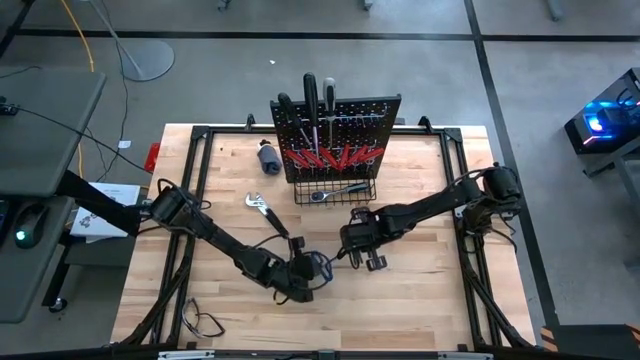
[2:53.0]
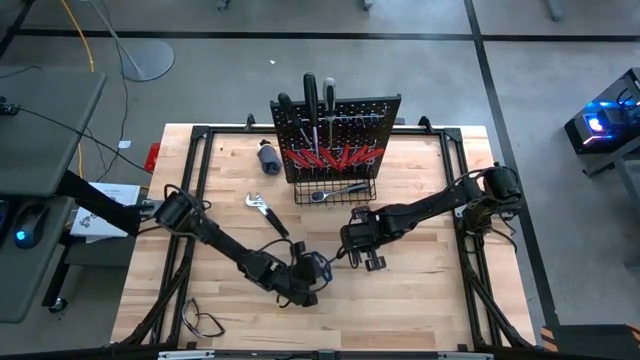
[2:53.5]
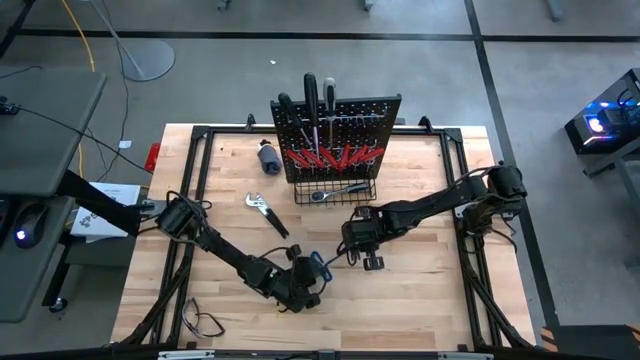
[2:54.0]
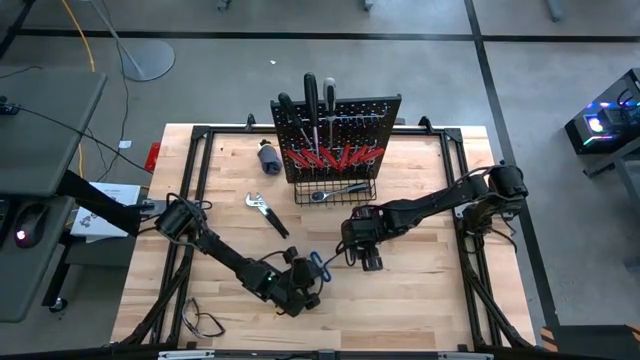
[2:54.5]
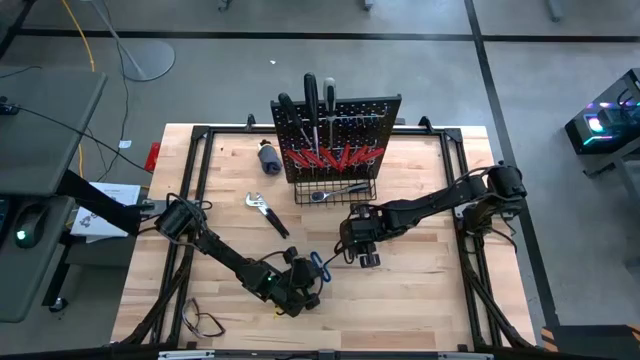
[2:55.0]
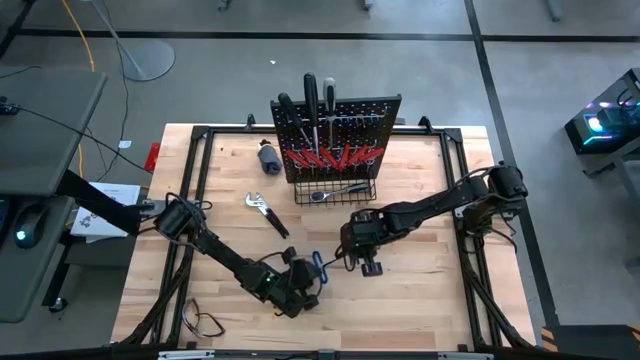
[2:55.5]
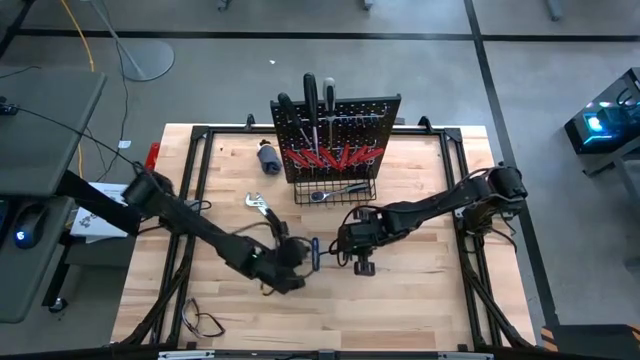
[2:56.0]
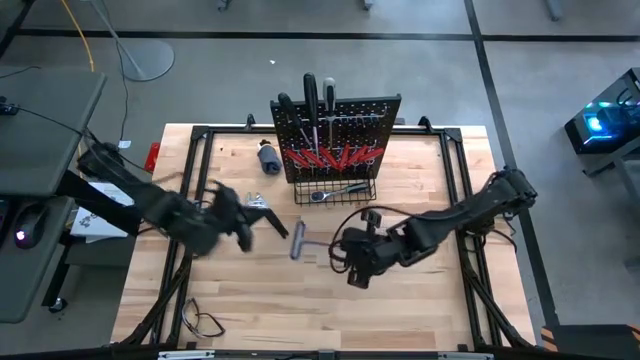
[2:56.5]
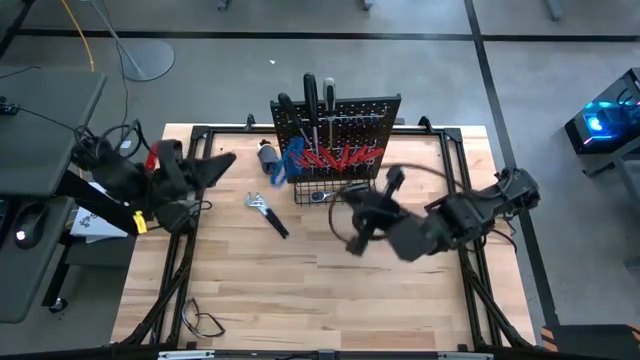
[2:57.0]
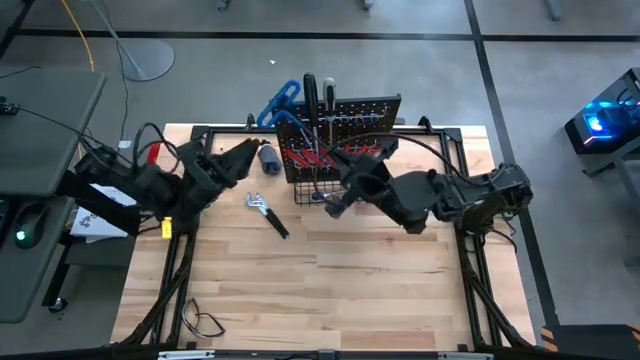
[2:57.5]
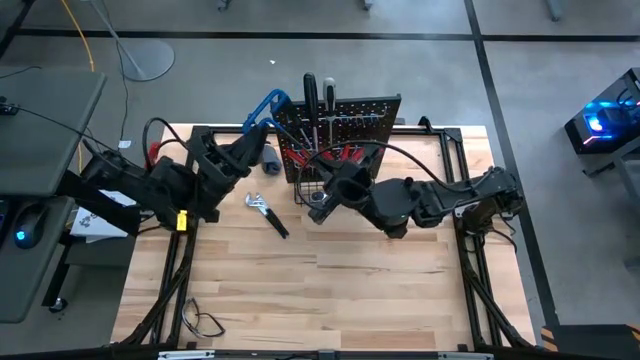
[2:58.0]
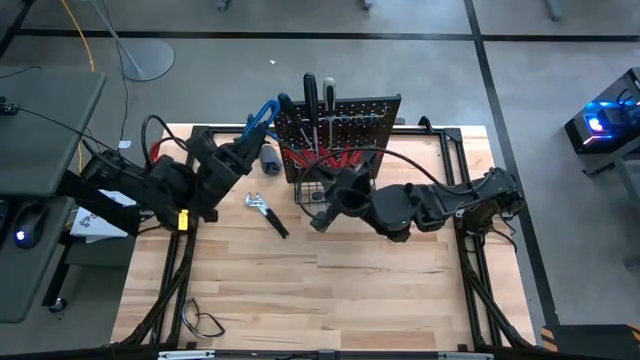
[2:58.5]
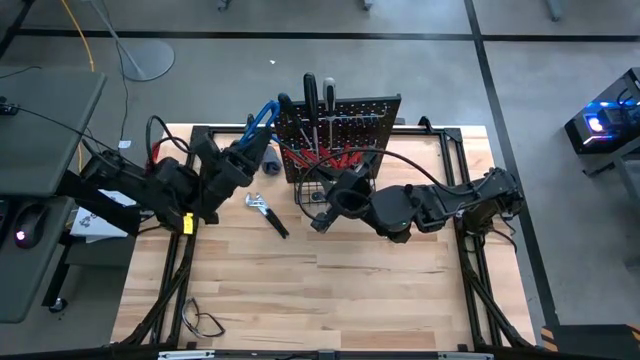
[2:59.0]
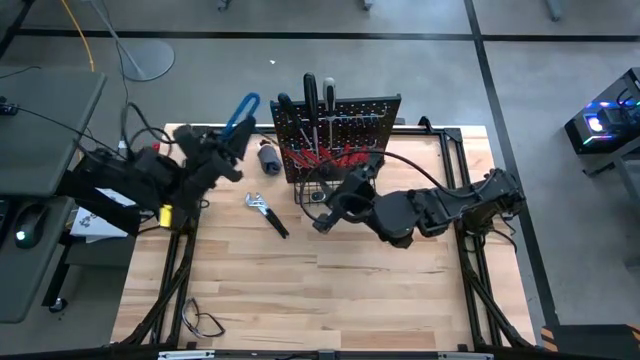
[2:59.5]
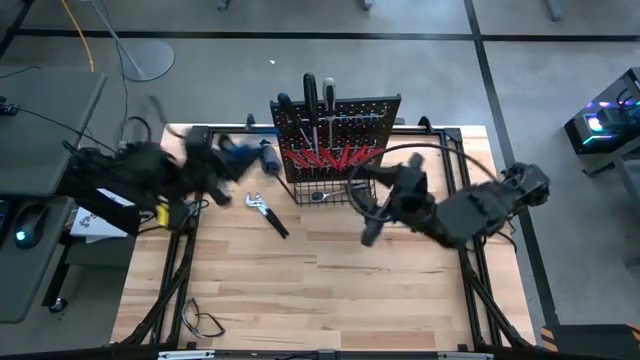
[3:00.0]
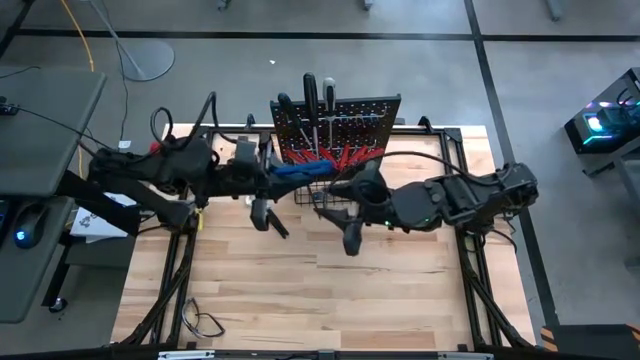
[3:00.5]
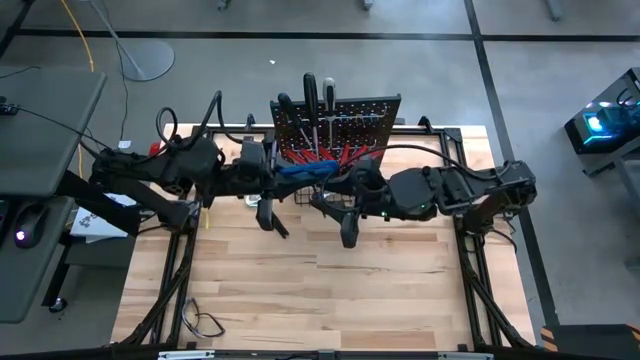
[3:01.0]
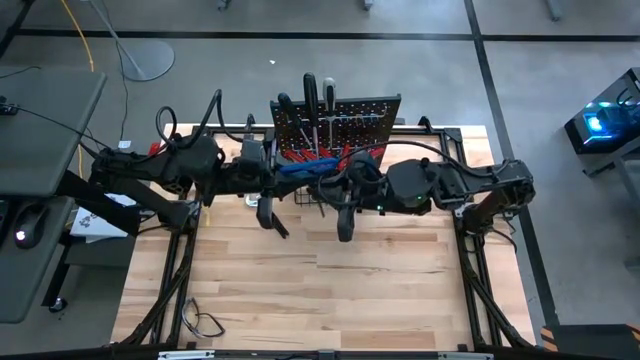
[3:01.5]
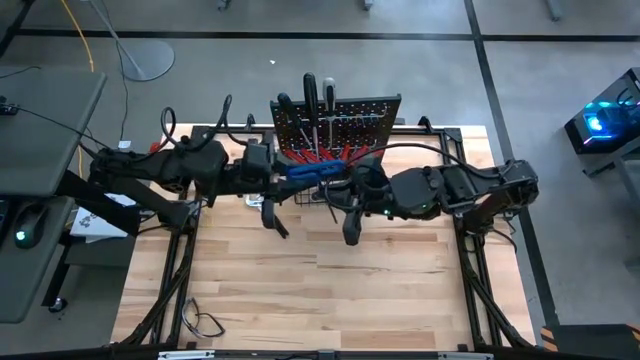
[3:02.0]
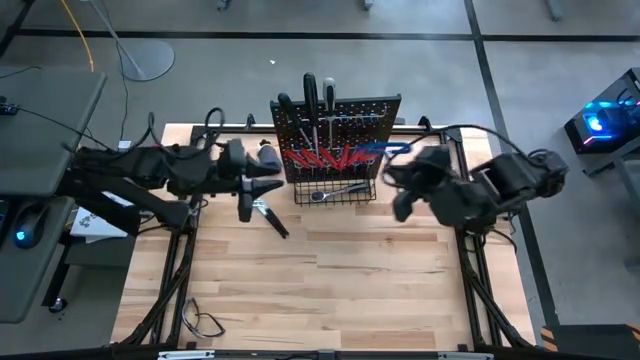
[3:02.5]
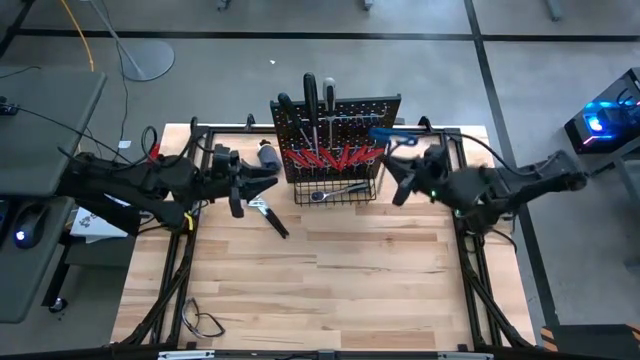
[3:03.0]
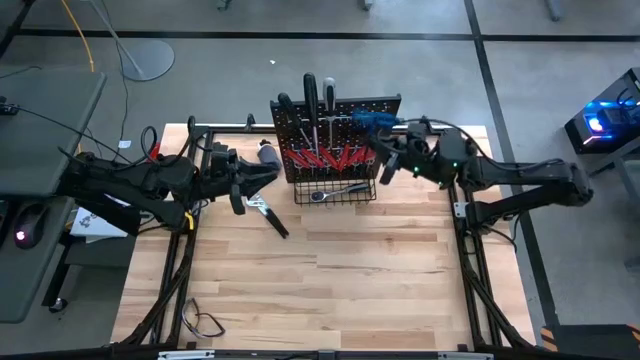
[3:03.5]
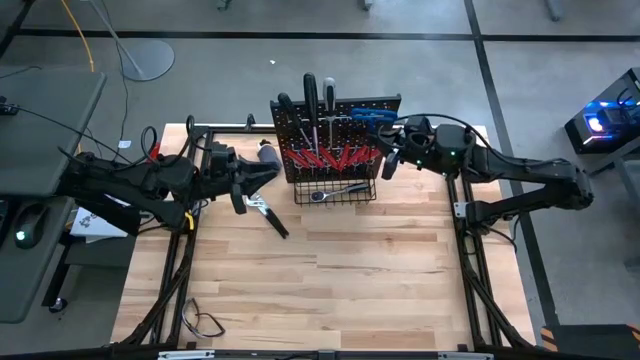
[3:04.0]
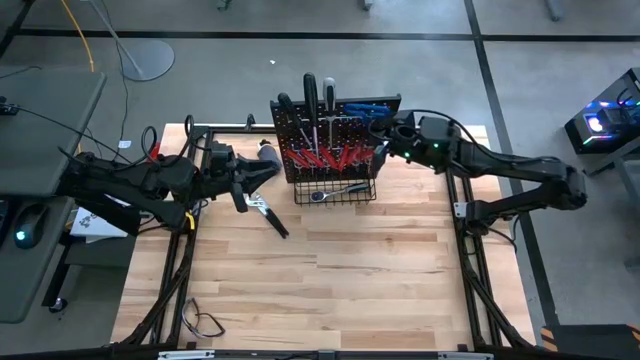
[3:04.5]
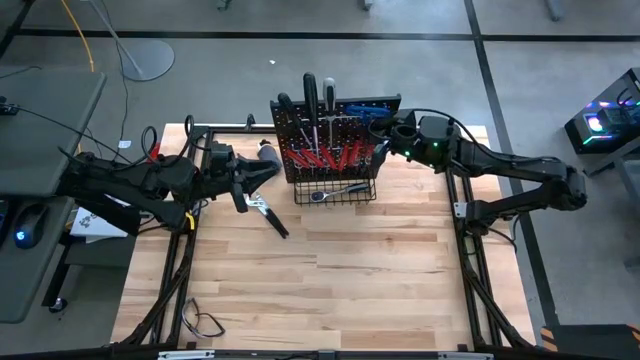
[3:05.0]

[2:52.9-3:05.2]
Task: Hang tools onto peg board
Hang the blue pick tool on the peg board

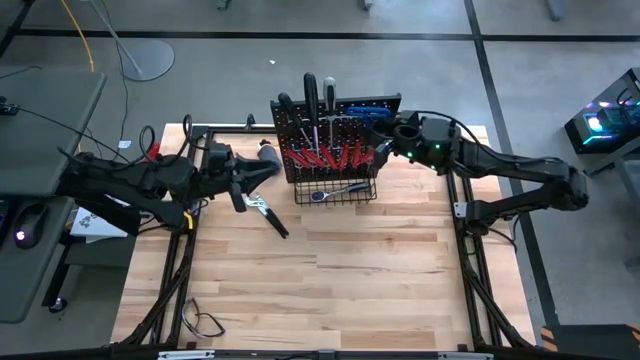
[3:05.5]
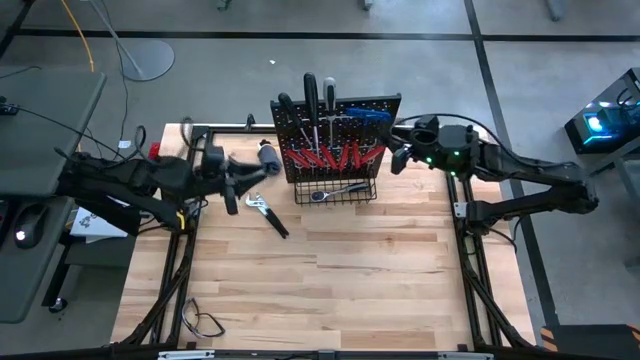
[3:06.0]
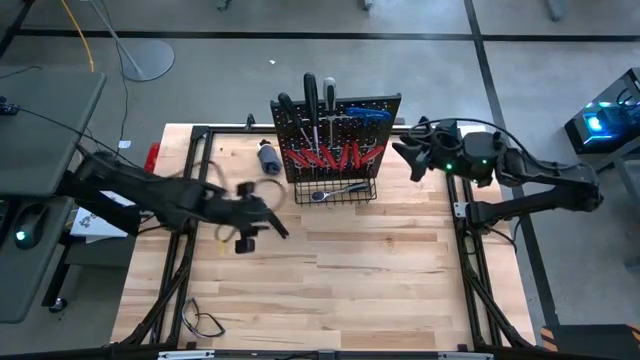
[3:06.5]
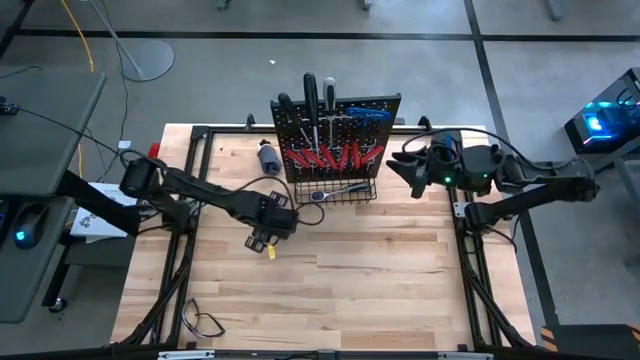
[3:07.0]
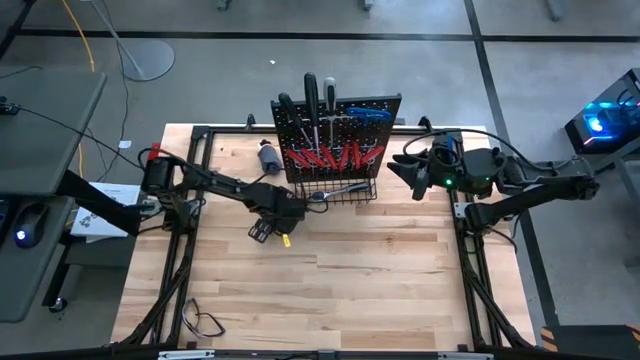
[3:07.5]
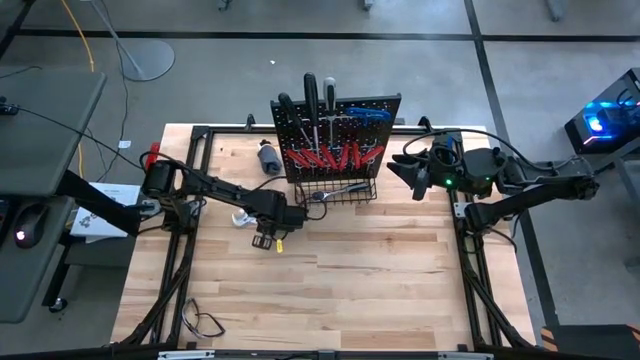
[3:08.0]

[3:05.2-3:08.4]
Put the silver slip-joint pliers into the wire basket on the peg board

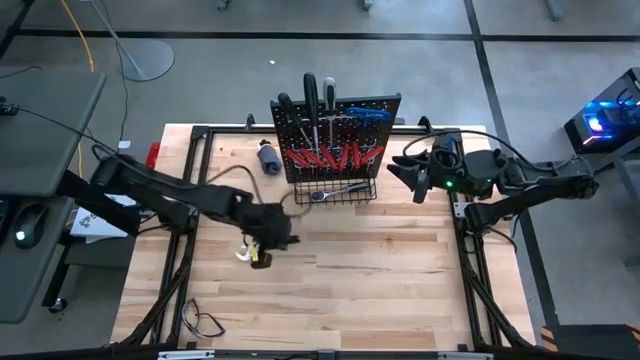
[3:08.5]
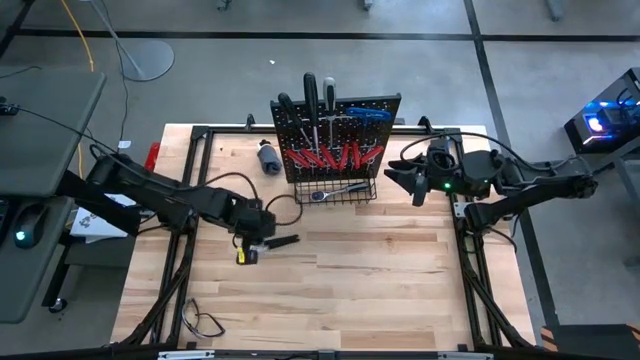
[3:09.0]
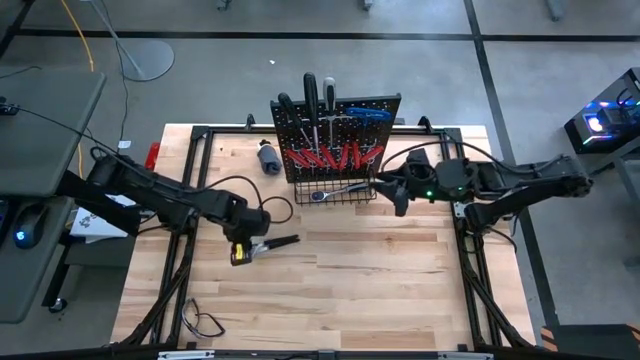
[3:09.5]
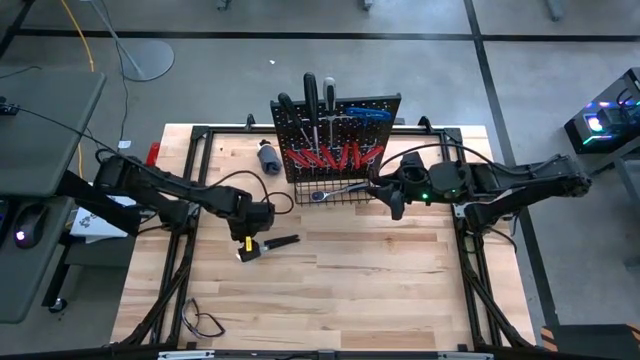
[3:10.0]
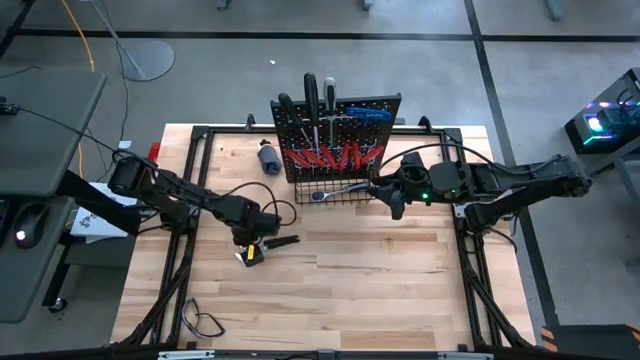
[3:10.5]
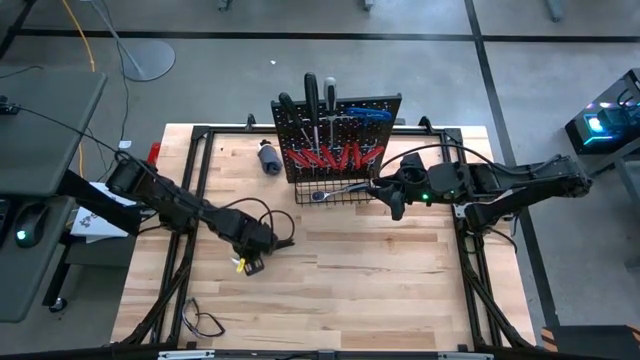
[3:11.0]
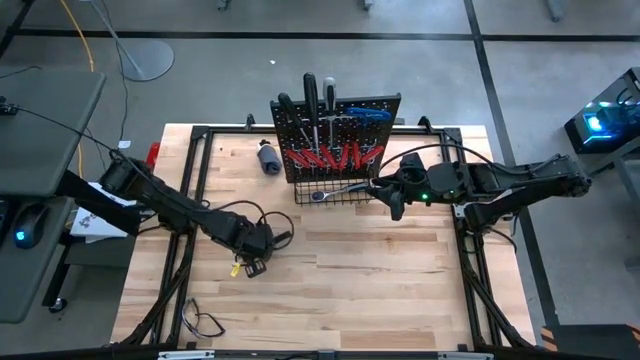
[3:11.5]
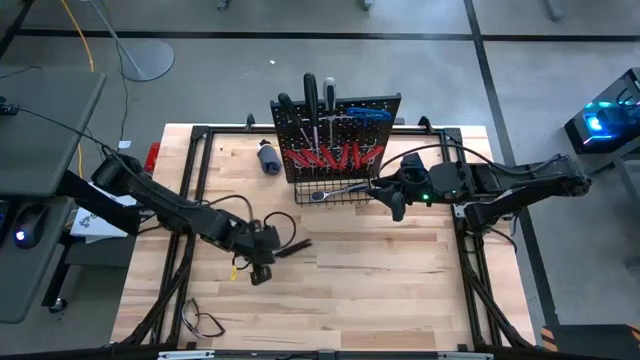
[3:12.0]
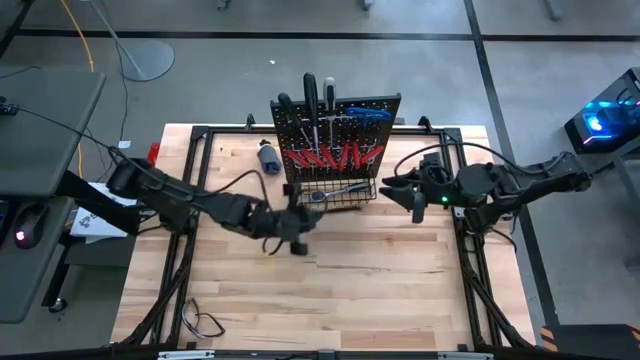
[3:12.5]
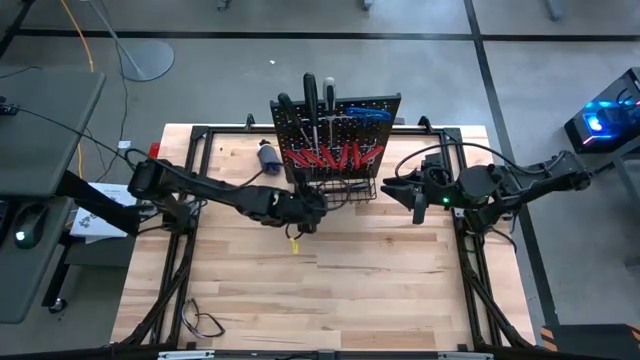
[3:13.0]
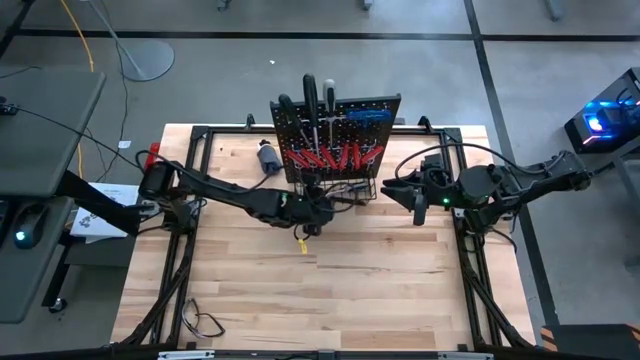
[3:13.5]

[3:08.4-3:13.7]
Put the silver slip-joint pliers into the wire basket on the peg board
